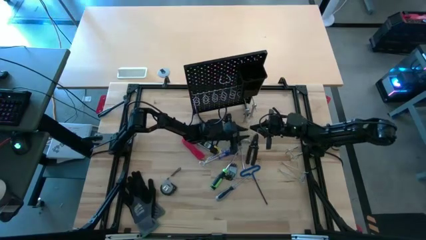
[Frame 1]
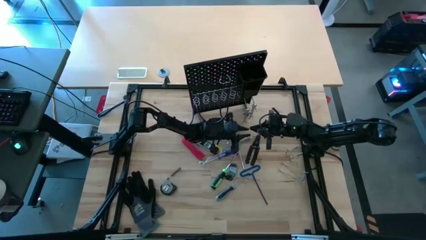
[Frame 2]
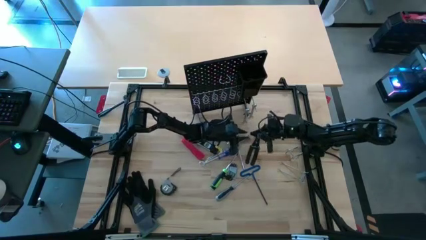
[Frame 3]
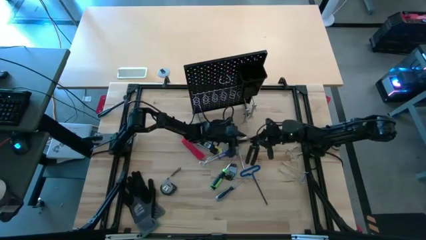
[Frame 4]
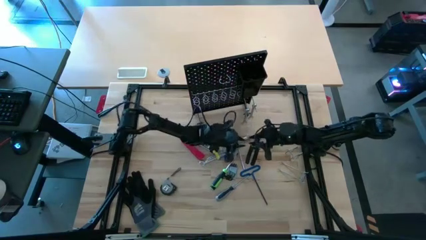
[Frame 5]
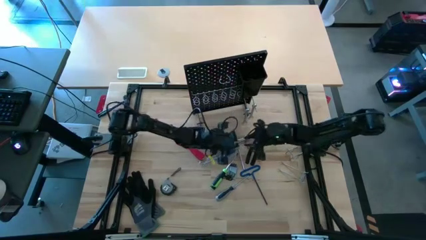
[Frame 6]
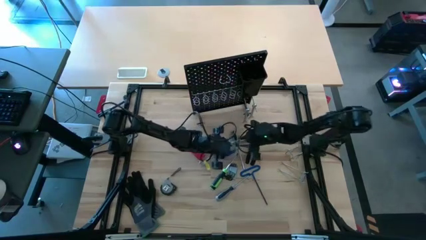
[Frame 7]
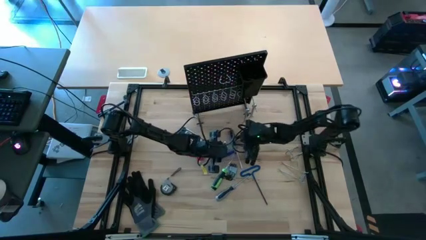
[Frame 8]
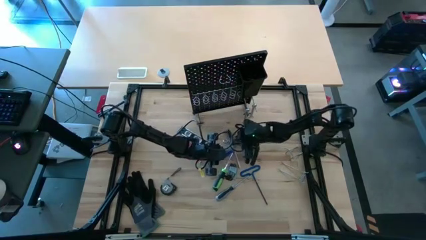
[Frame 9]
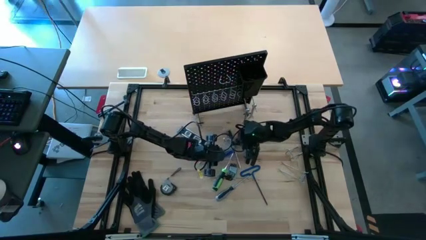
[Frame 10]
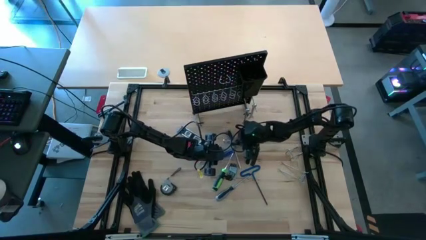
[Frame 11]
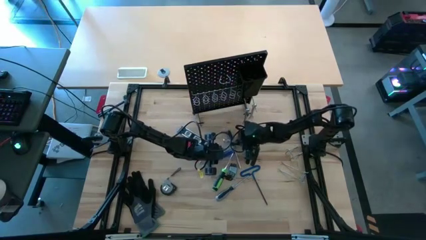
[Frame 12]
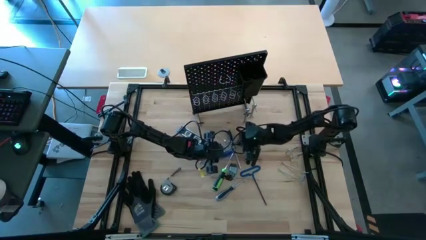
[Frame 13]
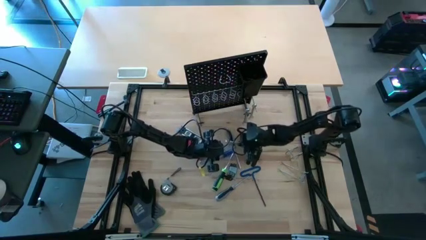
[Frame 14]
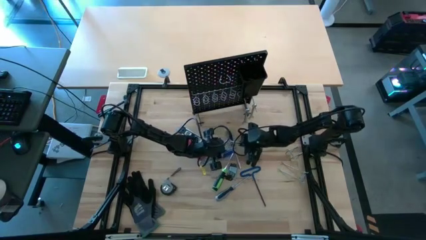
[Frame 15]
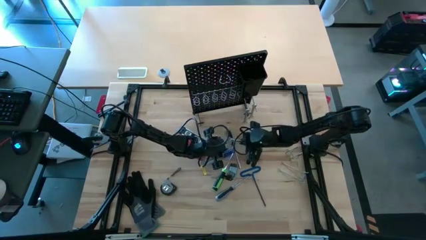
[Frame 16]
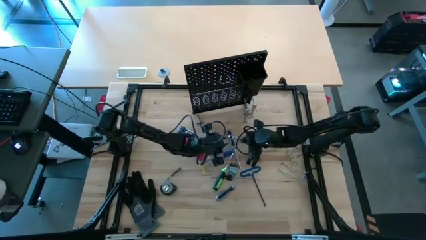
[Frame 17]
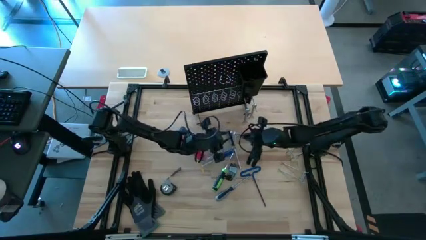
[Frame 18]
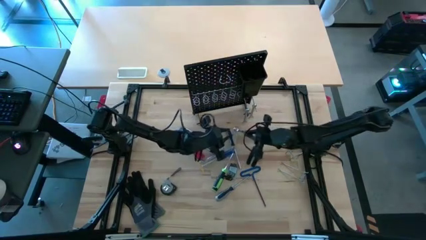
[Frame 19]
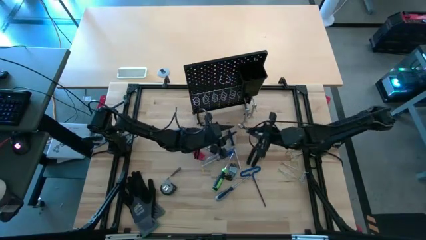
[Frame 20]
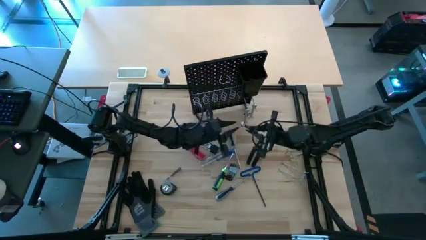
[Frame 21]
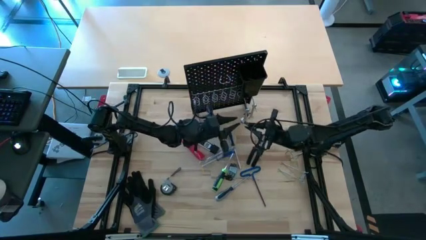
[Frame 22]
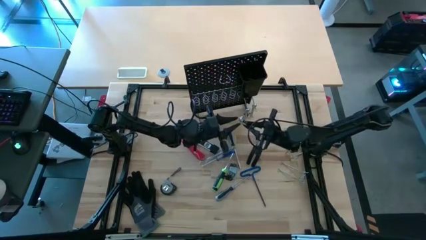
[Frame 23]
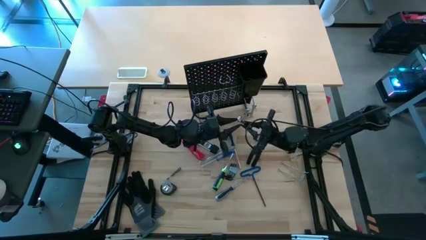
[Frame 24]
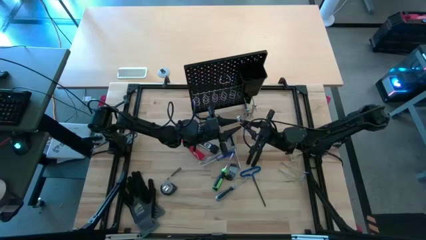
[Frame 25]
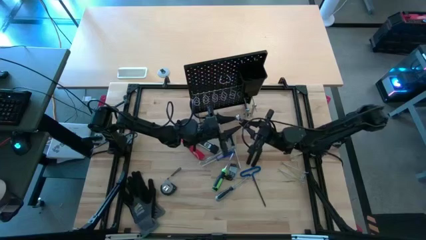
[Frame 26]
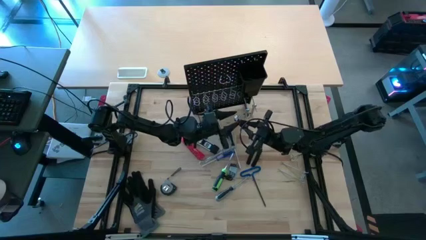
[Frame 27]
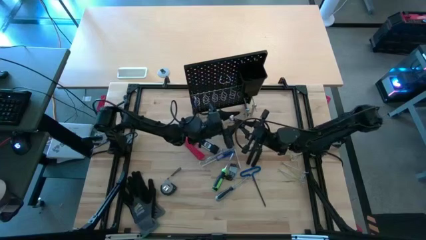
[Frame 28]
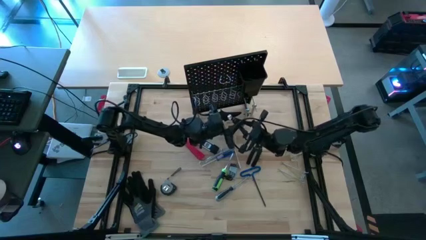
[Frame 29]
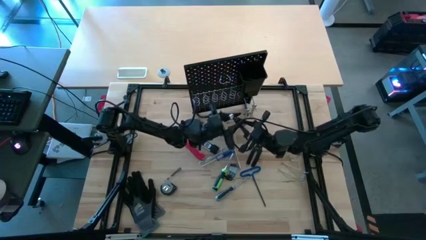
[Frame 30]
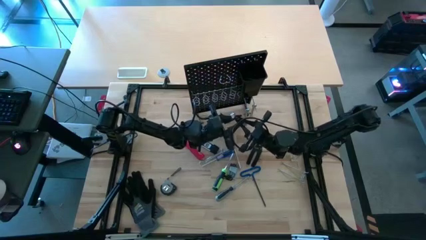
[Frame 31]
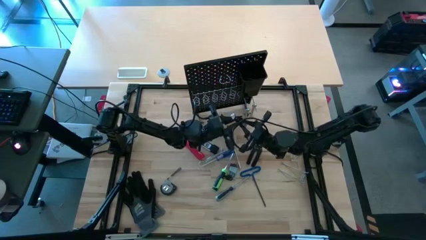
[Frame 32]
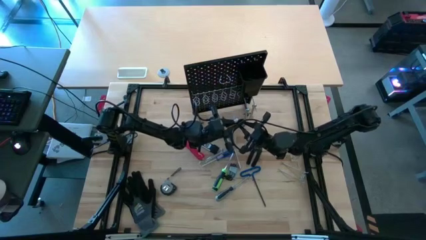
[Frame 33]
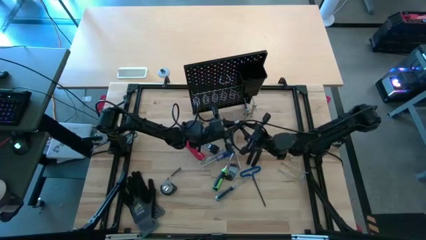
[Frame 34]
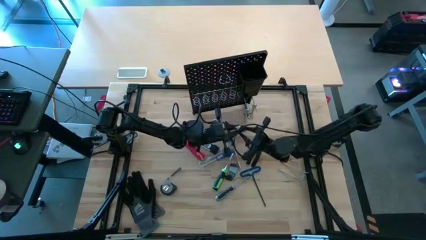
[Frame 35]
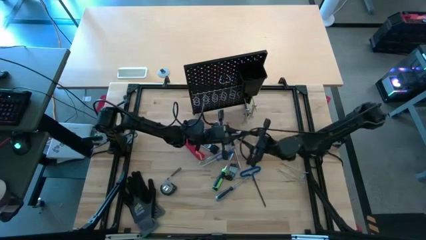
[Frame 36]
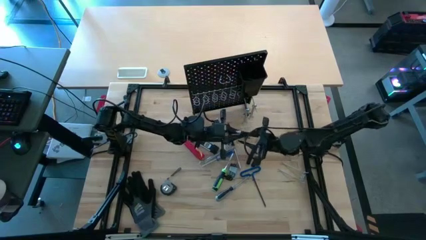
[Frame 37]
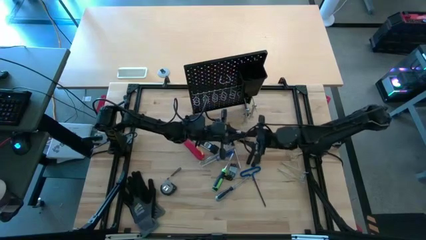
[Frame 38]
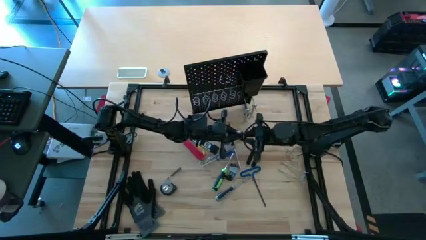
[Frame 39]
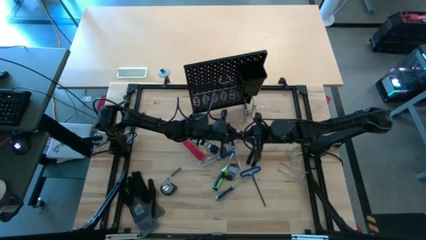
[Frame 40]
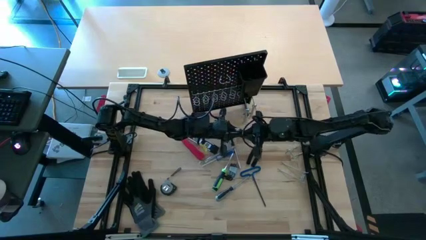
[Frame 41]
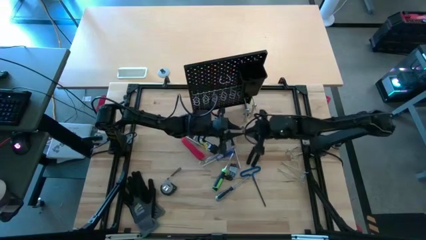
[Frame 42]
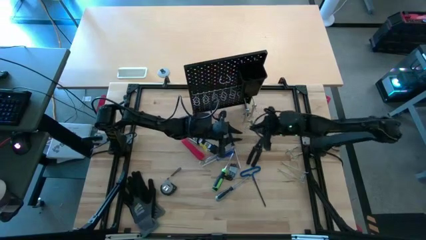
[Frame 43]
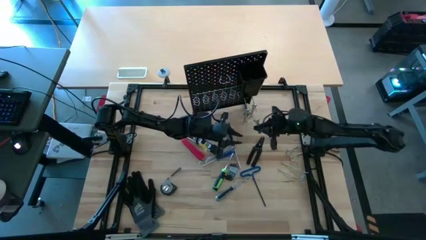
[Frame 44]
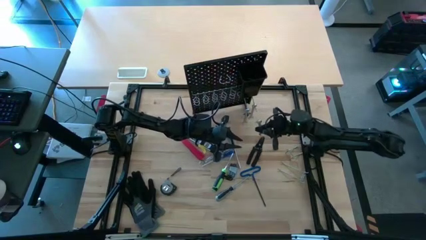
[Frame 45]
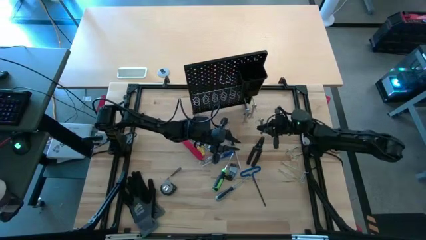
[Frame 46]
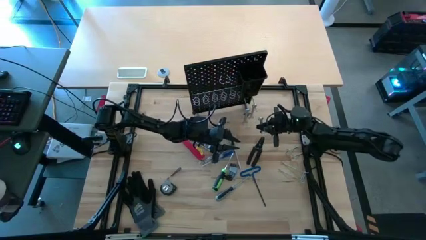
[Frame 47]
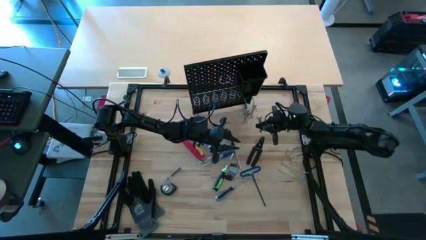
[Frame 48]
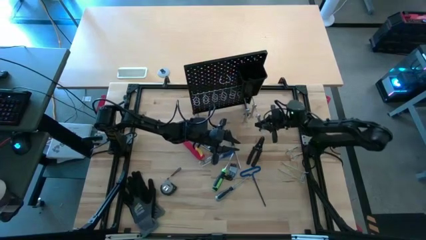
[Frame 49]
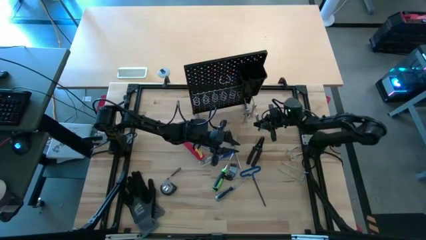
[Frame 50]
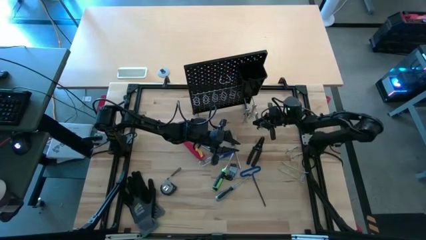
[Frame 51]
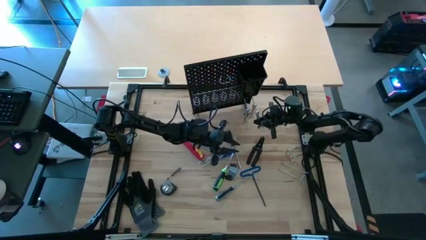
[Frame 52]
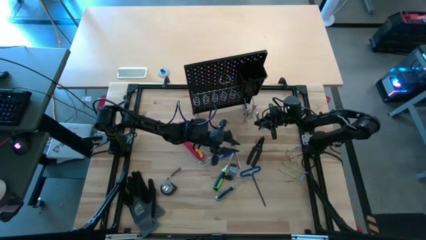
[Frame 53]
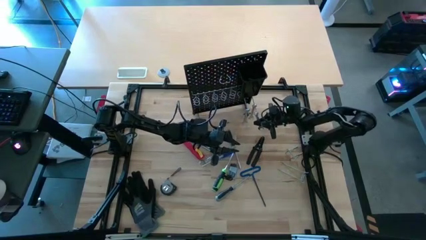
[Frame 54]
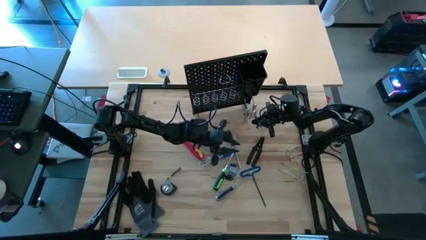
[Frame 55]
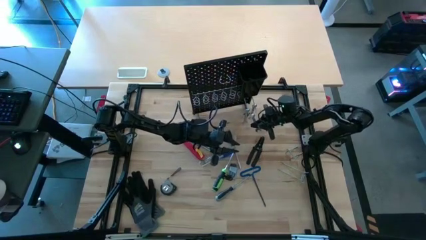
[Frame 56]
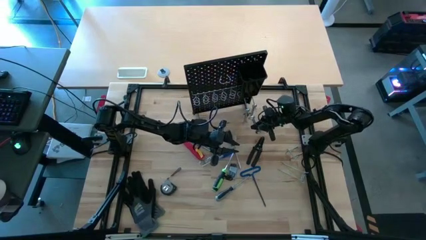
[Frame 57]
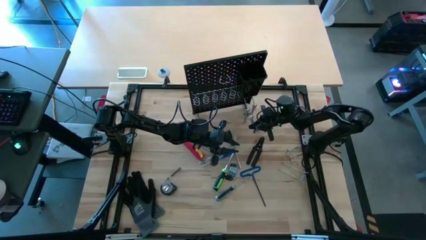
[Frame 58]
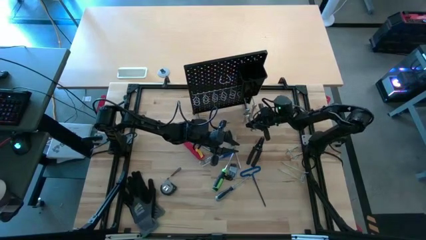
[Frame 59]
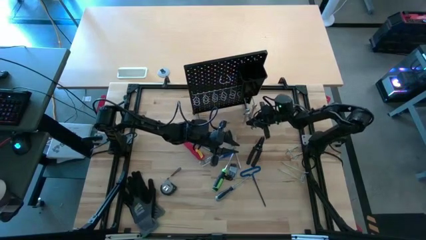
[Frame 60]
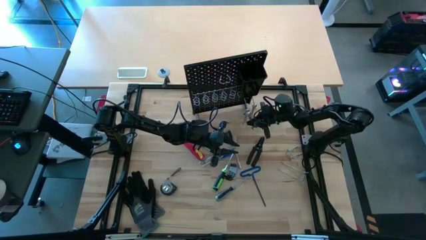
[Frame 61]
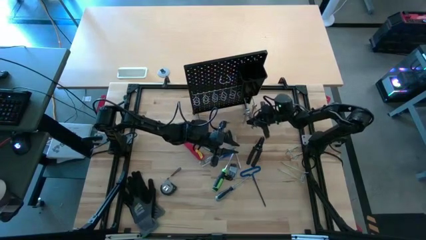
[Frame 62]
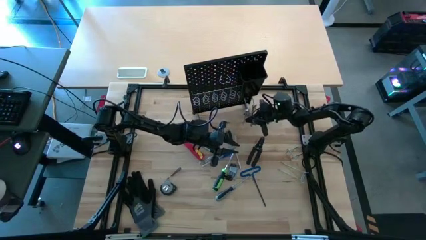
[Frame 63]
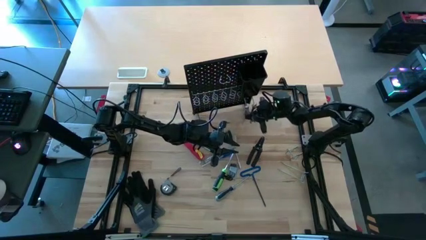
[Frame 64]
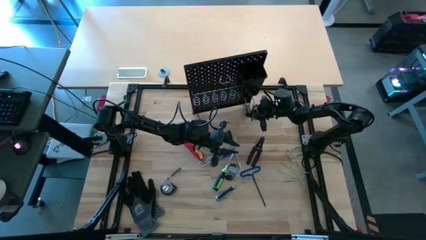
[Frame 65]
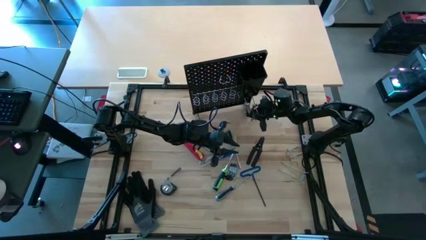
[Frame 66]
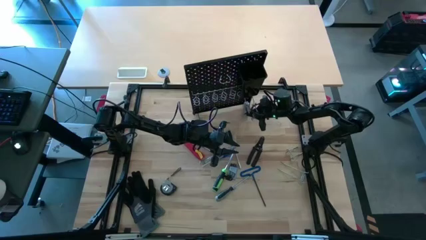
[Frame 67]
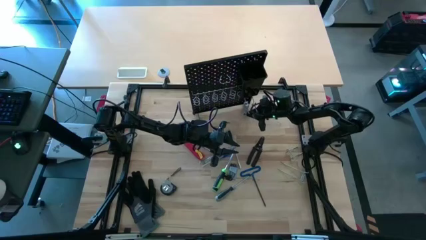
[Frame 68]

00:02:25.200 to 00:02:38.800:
Task: Hang tools onto peg board
Hang the left wrench onto the pegboard

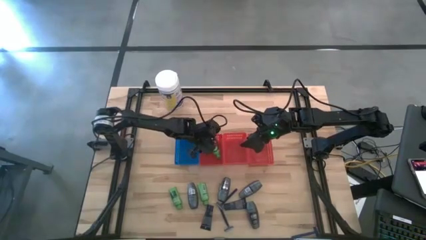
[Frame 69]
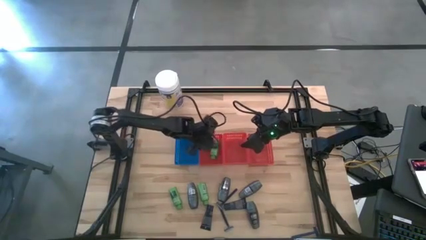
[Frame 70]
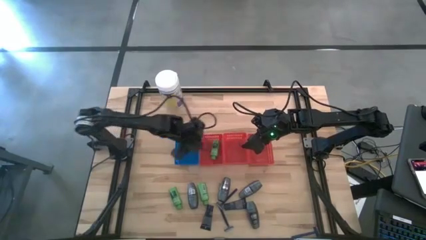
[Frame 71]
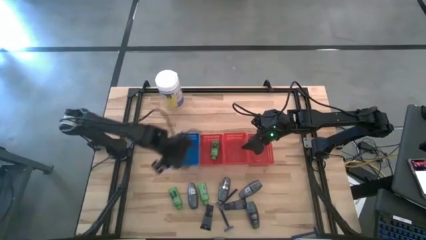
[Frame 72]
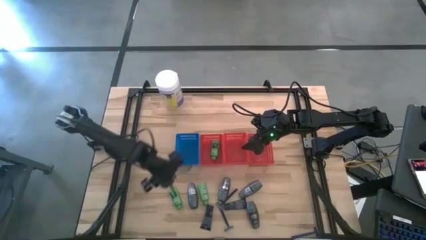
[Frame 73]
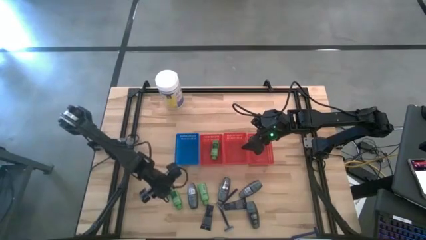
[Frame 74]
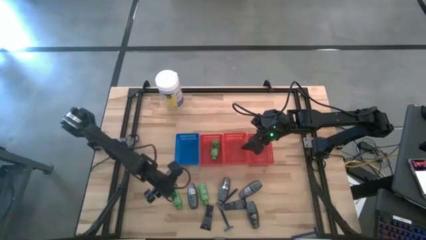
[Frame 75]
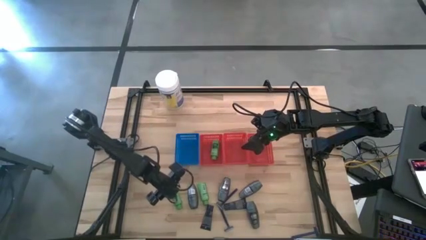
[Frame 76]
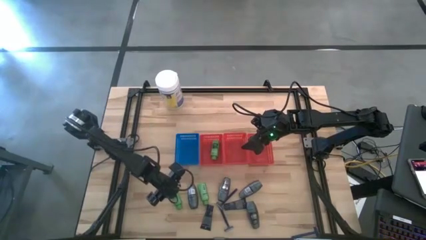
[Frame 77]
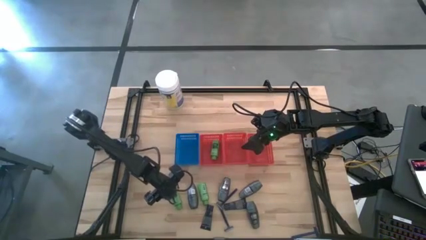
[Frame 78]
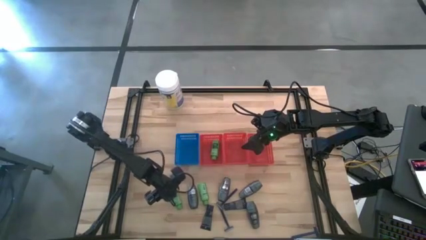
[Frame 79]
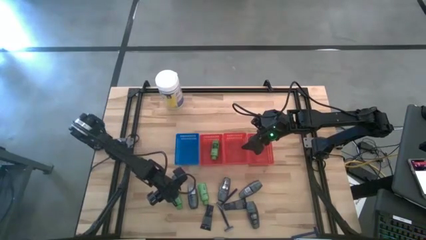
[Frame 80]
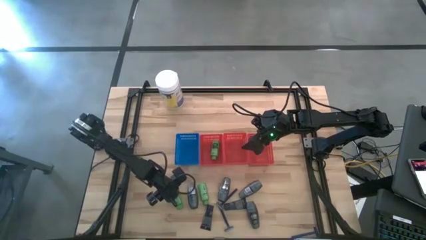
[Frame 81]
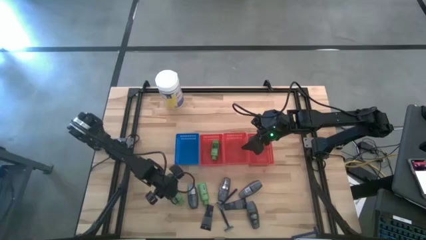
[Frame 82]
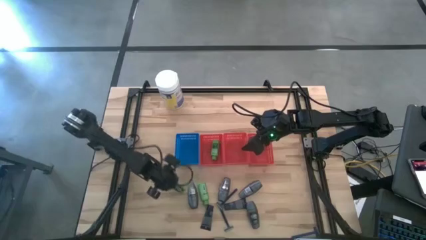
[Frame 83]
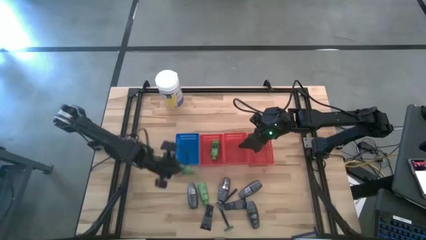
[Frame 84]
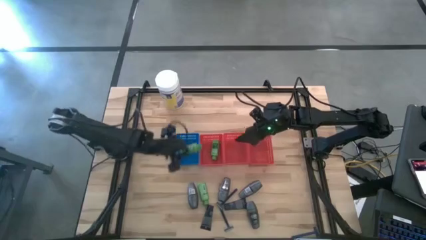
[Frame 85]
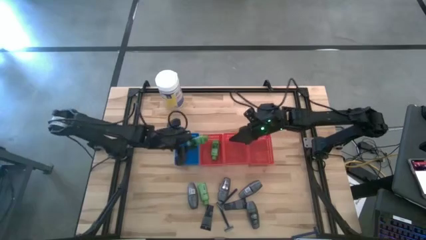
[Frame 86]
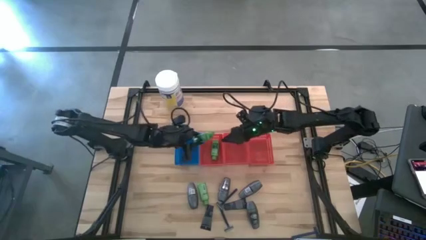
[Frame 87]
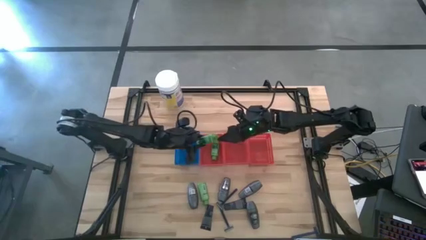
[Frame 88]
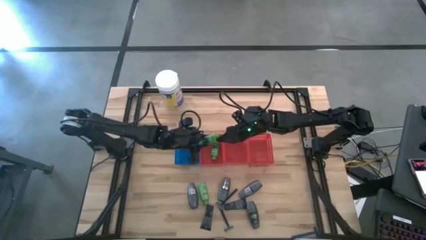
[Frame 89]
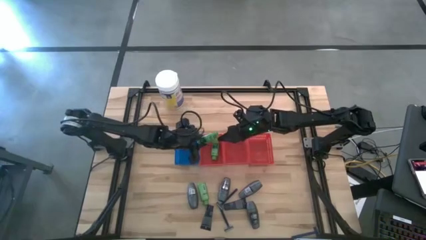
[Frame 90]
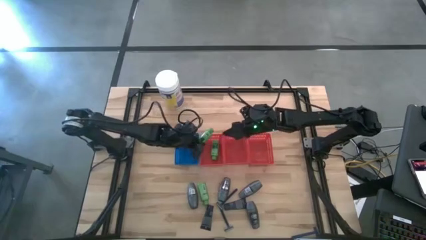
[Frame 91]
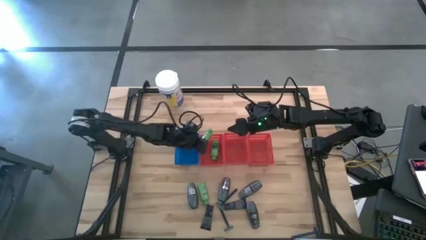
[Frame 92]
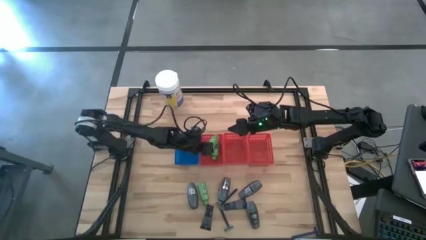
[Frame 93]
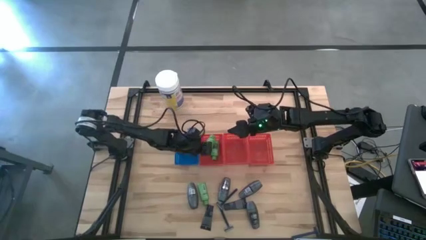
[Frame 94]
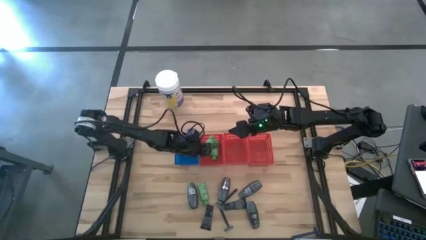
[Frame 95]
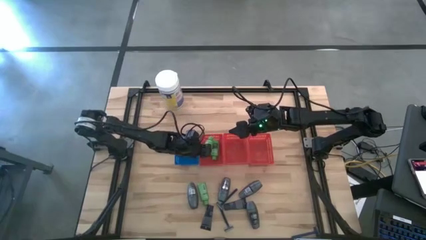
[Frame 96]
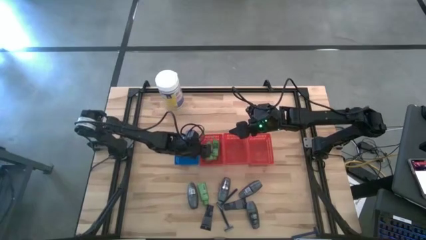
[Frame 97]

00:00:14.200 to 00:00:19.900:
Task: Pick & Place Travel size toiletries
Put the left green shampoo into the left red basket
